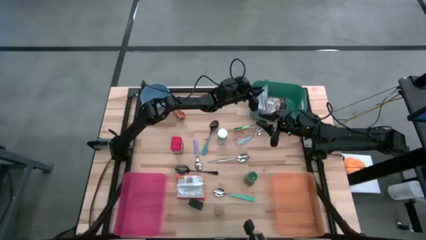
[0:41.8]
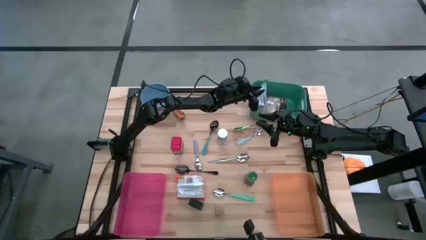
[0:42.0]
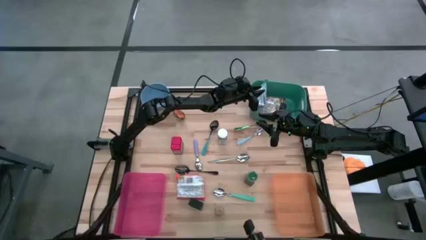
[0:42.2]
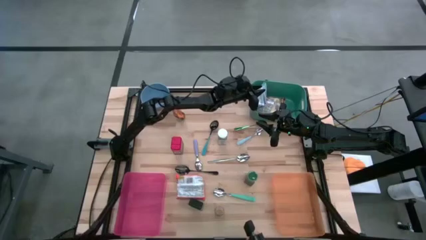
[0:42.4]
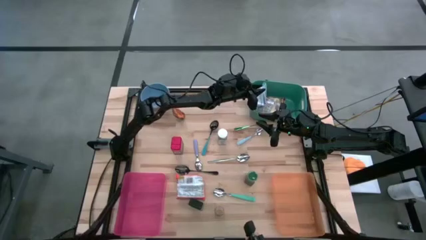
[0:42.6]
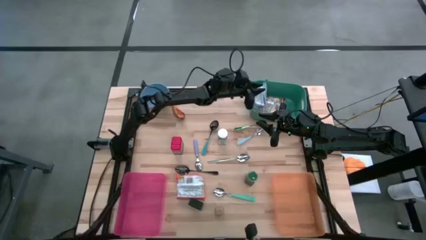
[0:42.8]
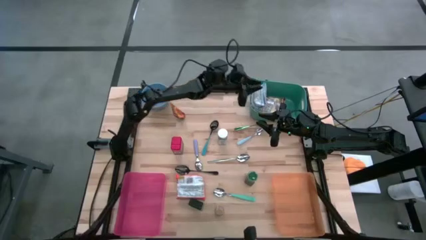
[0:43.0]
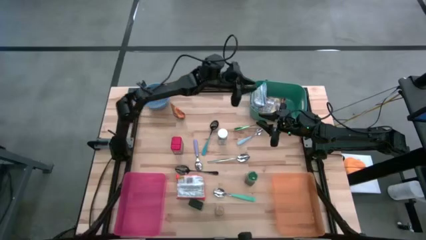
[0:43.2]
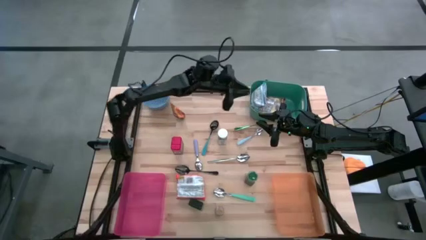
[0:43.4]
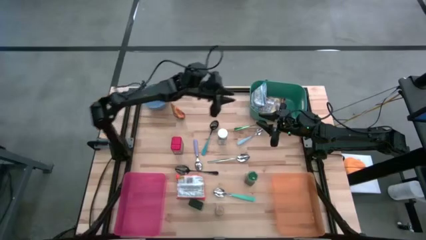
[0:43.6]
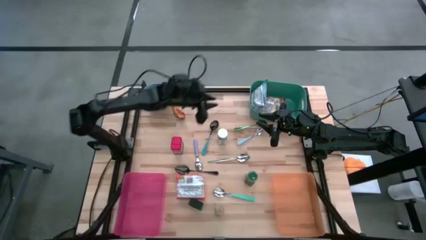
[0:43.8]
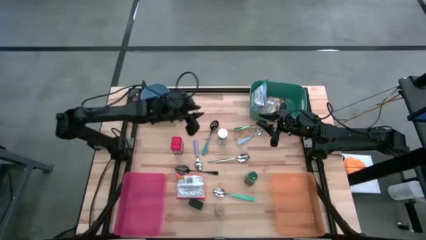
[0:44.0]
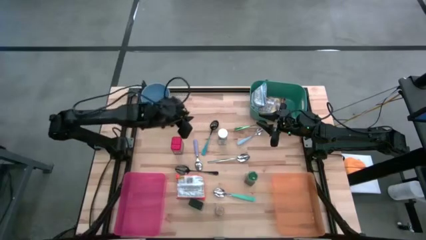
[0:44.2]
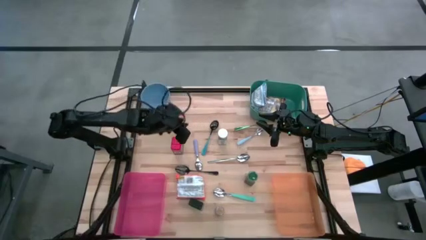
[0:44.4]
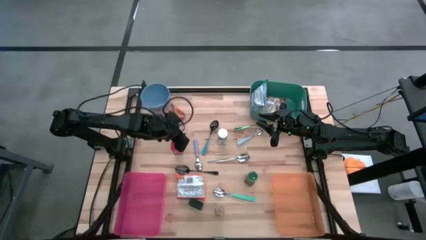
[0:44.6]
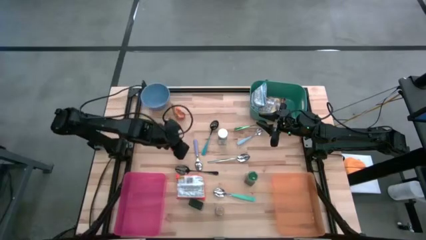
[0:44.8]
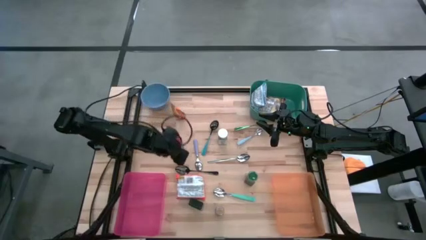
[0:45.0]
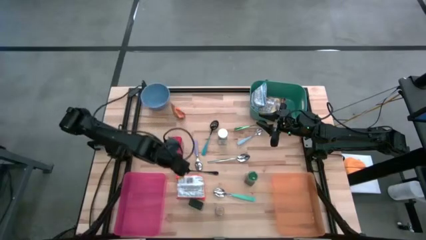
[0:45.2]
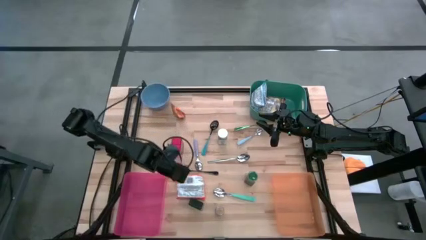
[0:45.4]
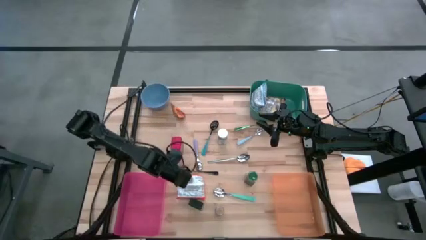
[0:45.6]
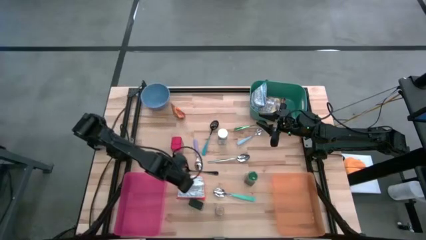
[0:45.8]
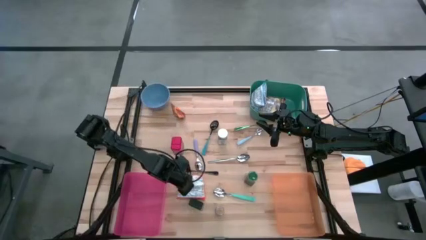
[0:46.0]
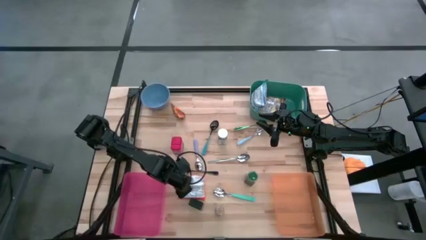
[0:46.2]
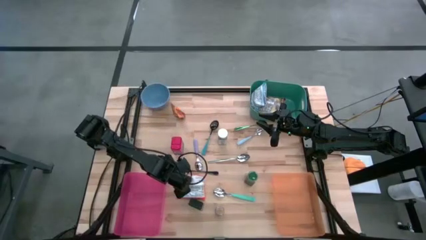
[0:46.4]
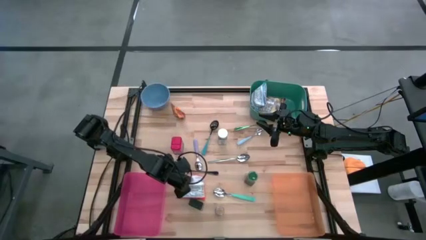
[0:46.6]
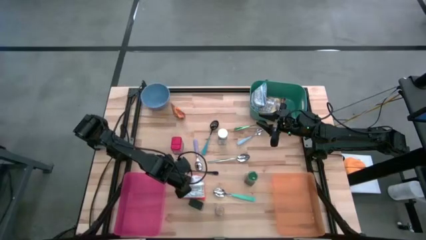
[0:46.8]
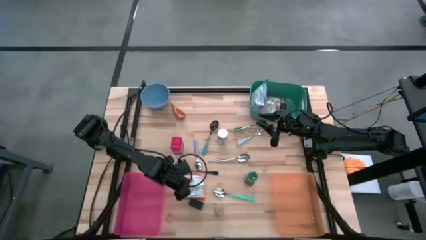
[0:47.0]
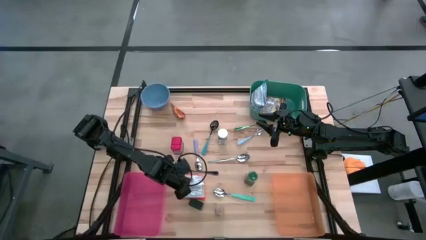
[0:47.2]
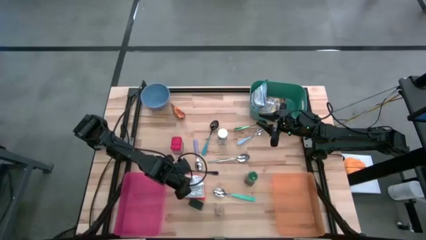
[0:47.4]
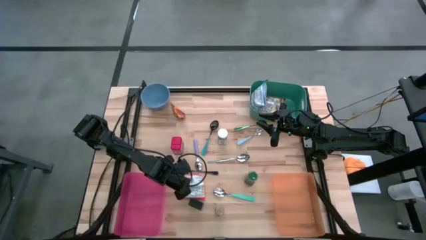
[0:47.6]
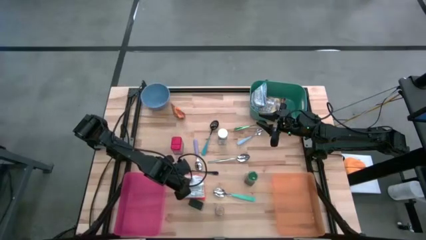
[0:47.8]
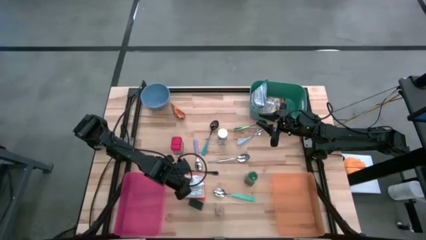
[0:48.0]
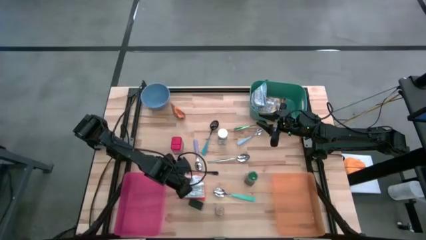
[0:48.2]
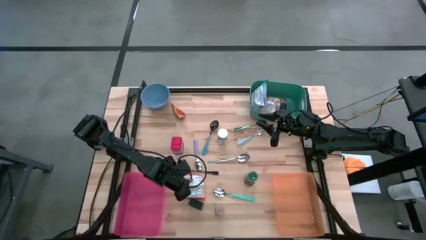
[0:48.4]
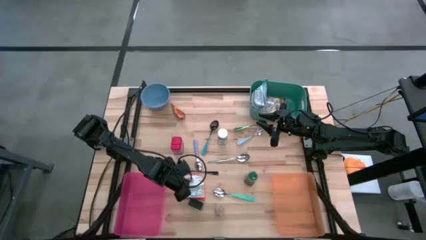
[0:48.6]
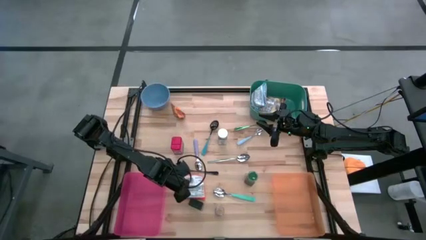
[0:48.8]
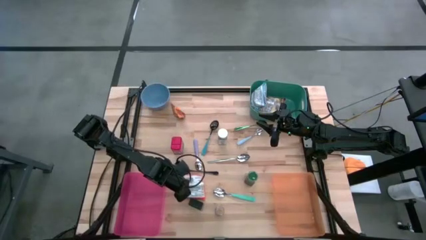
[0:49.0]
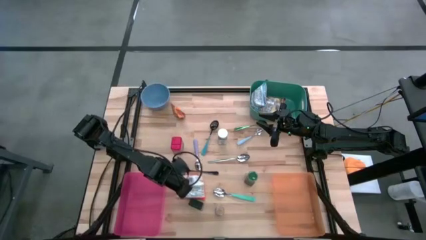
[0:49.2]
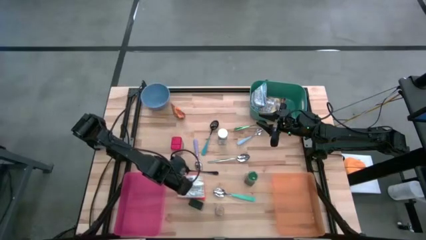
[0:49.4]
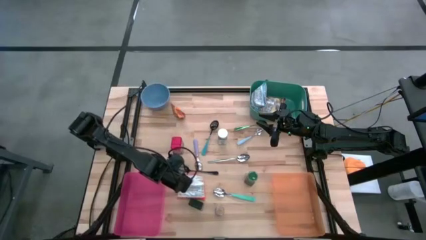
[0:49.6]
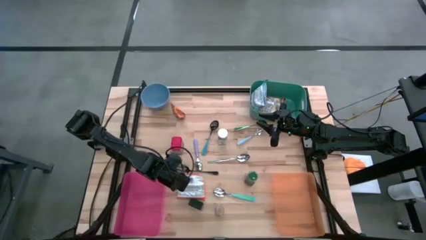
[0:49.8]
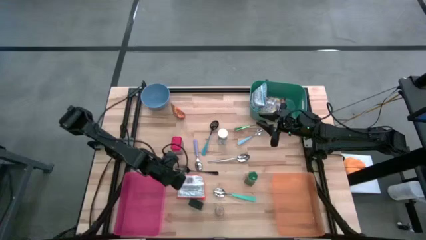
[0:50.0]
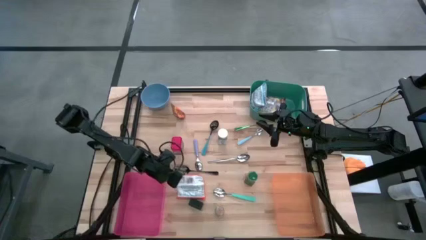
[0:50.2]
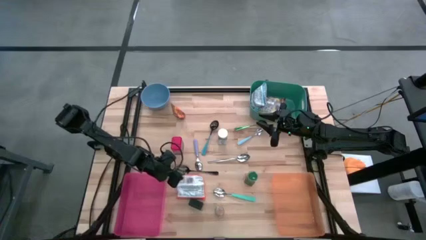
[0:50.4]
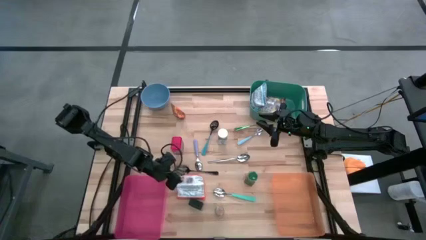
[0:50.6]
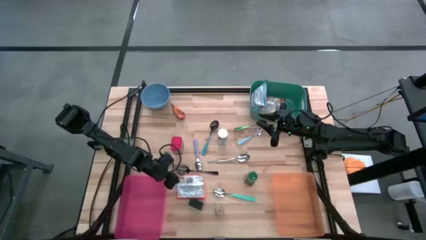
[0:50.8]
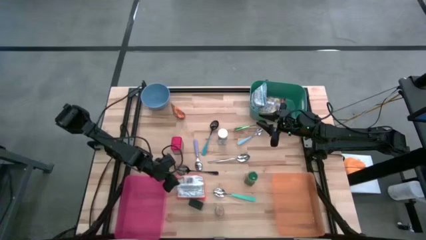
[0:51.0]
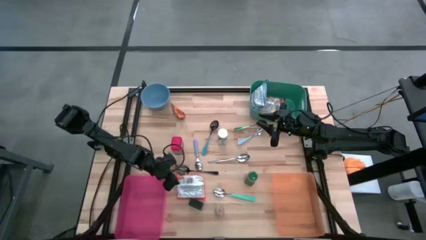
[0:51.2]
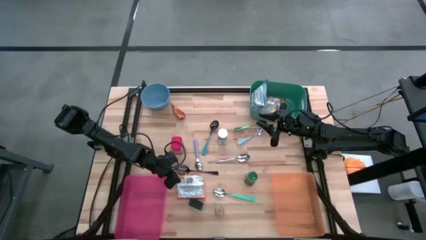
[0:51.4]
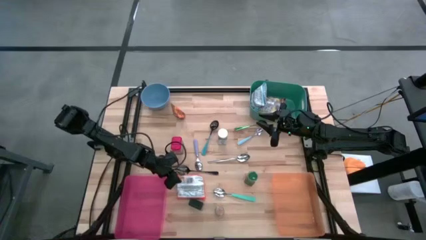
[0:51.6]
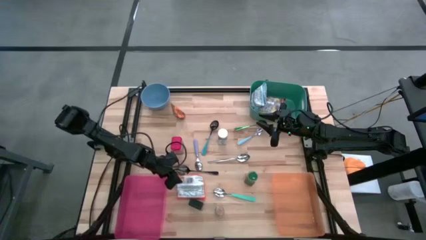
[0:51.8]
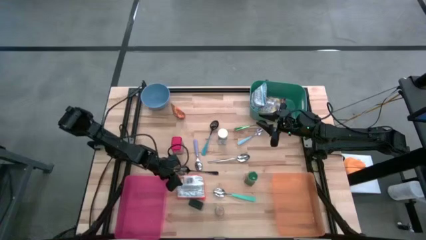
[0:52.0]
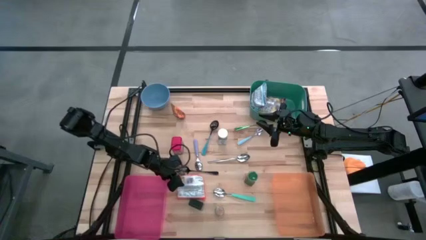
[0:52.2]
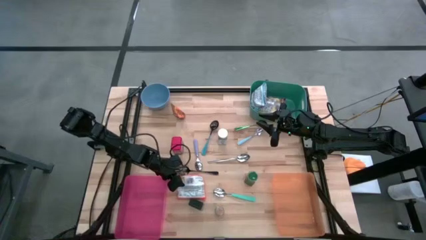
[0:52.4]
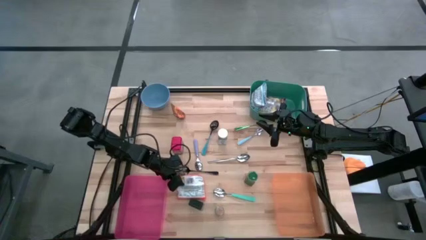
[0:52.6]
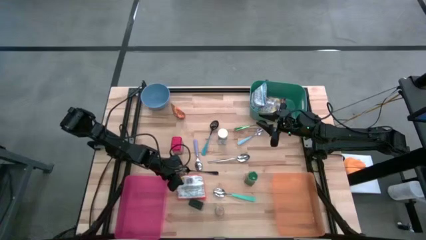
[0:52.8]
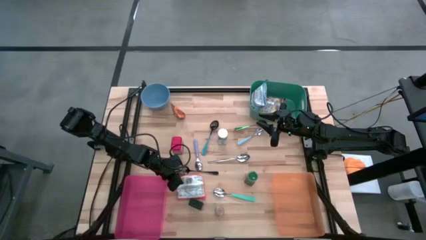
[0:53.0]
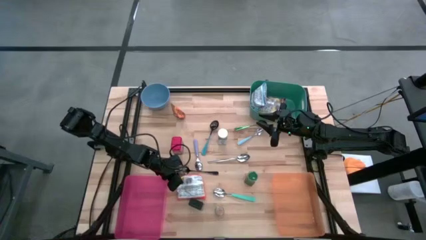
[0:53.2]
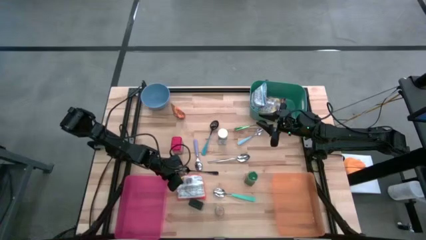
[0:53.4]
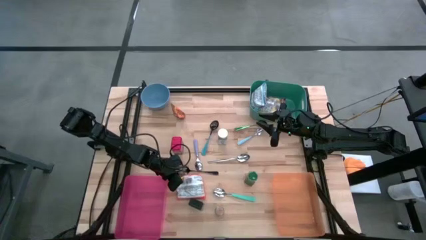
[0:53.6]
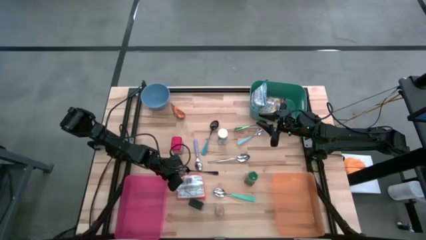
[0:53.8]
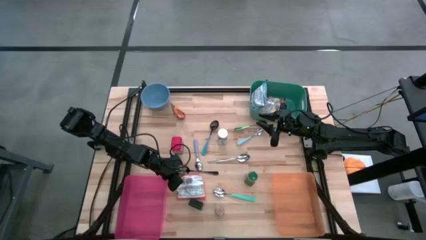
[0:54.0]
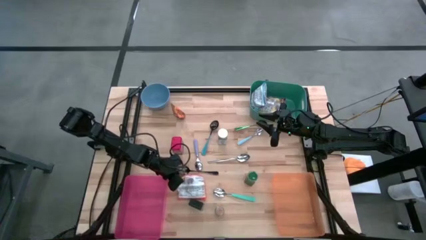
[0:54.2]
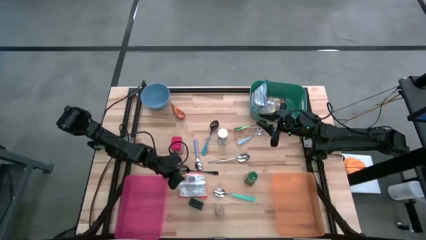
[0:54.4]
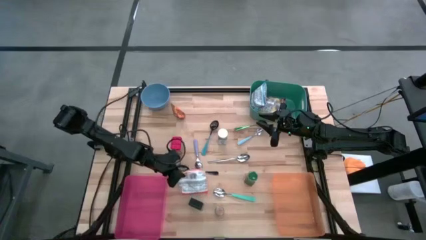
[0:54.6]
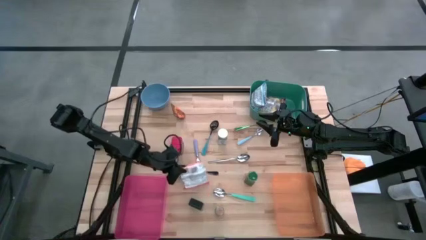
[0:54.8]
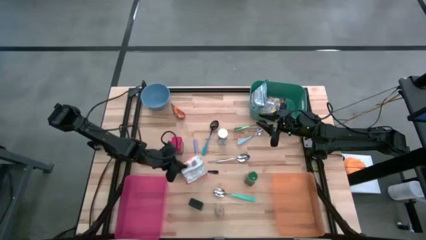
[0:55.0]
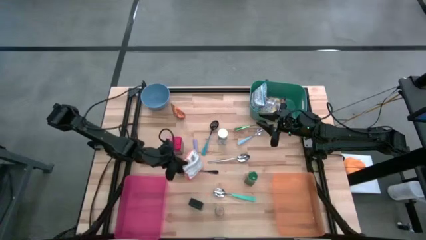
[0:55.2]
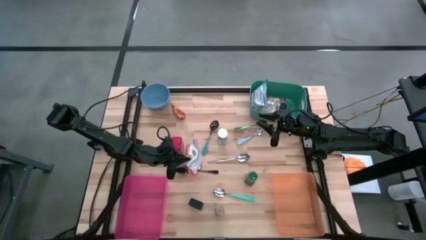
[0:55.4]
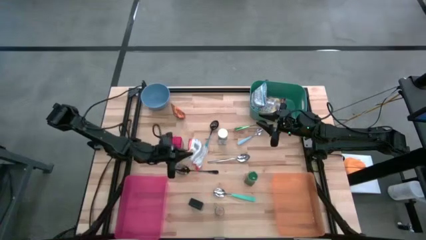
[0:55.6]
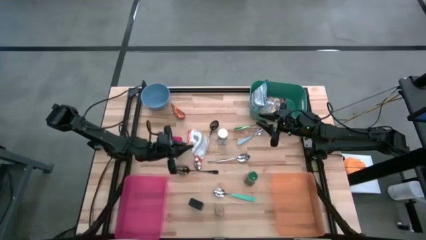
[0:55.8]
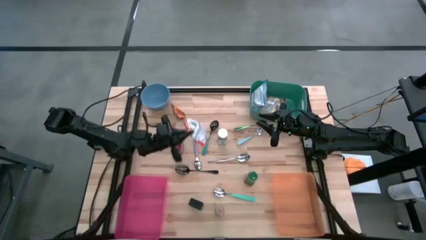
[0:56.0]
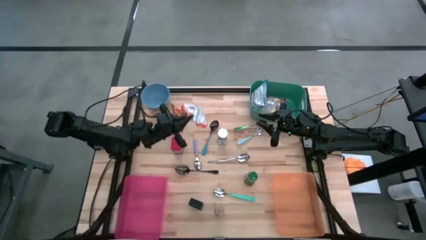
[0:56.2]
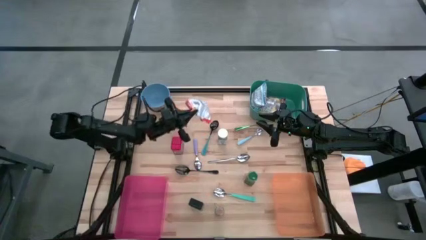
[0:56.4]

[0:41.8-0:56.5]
Put the orange noodle pack into the green bin
